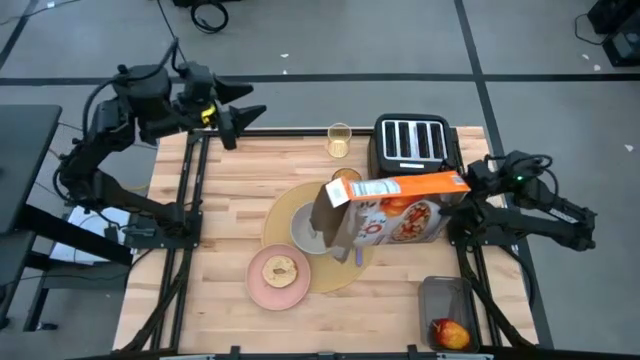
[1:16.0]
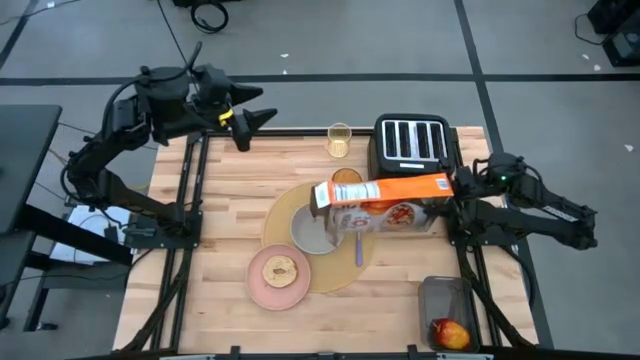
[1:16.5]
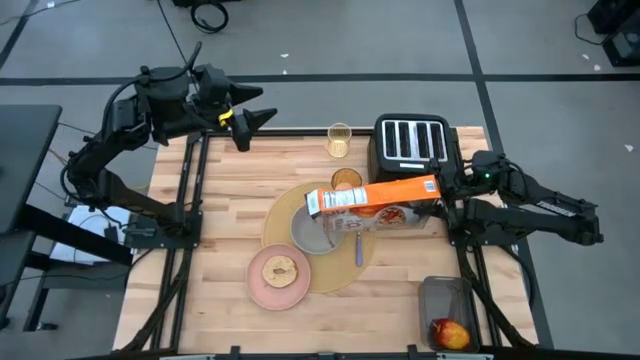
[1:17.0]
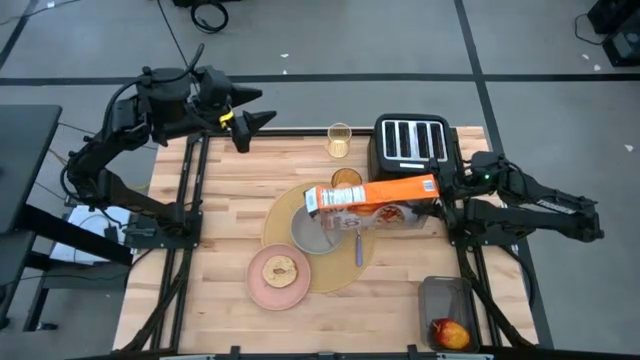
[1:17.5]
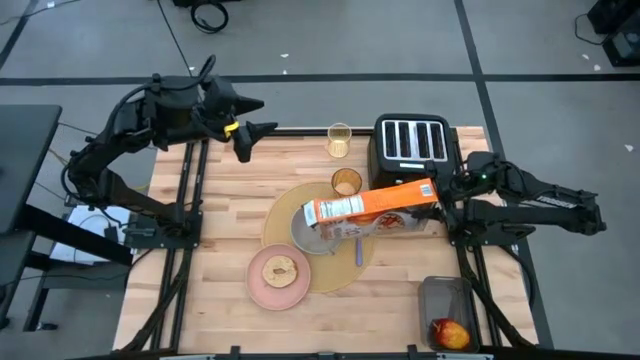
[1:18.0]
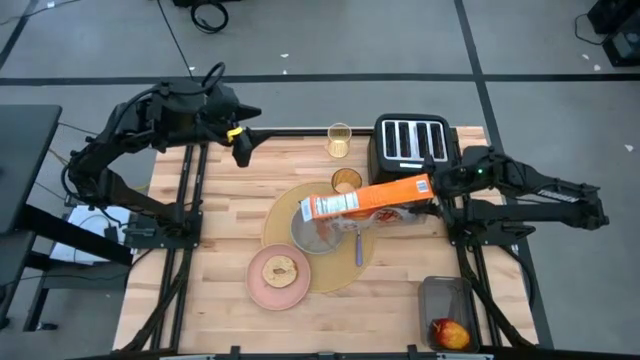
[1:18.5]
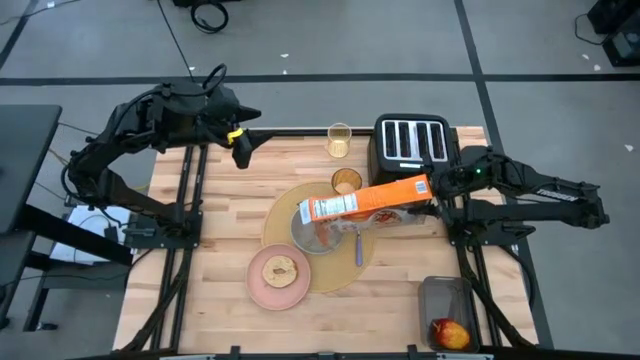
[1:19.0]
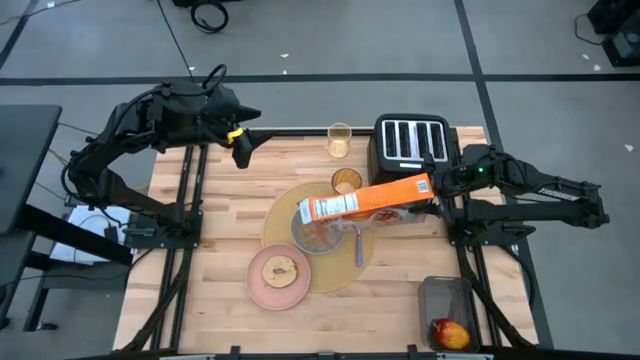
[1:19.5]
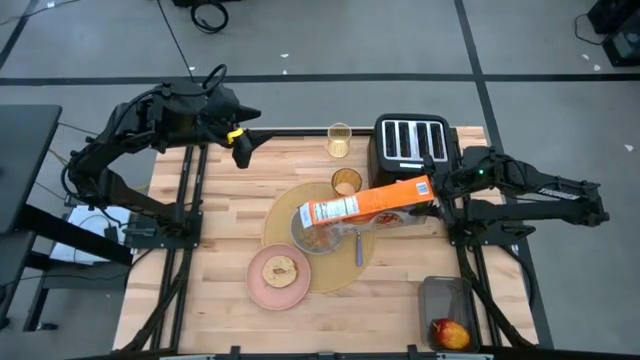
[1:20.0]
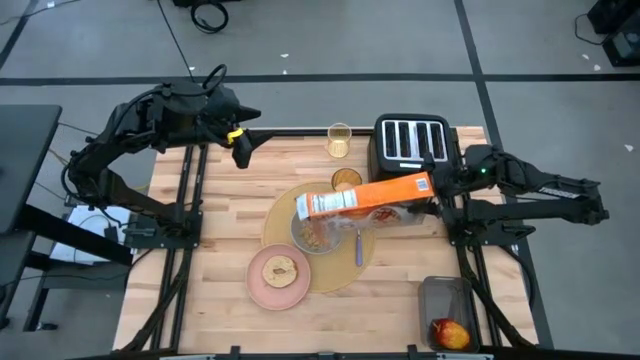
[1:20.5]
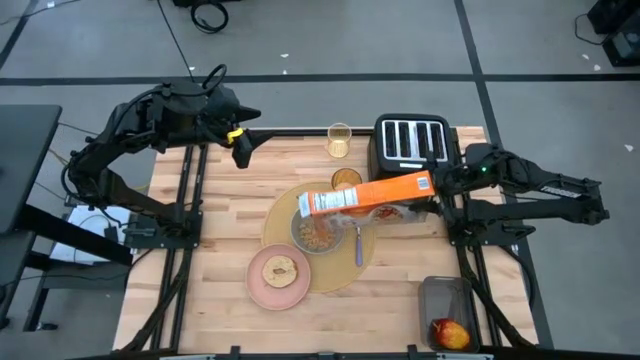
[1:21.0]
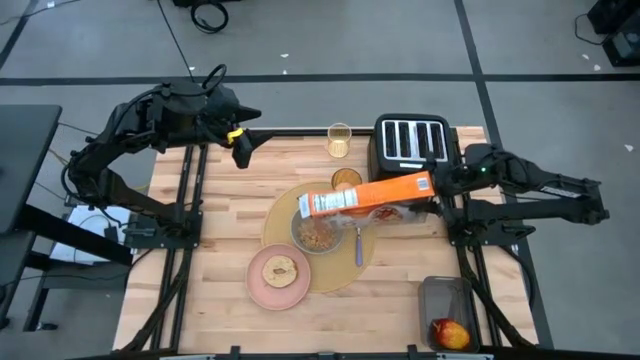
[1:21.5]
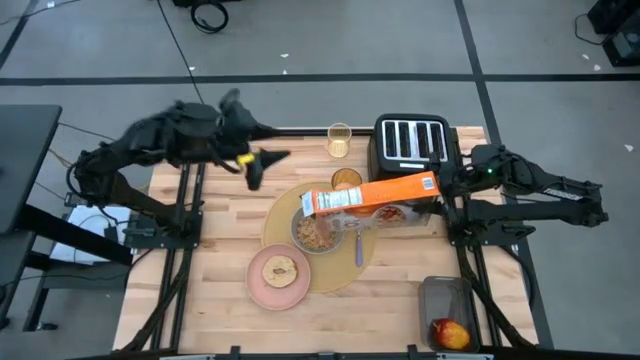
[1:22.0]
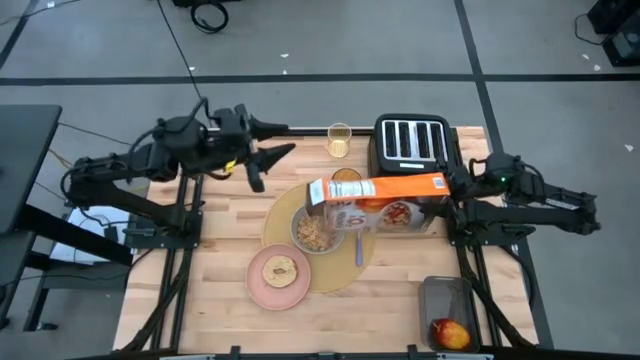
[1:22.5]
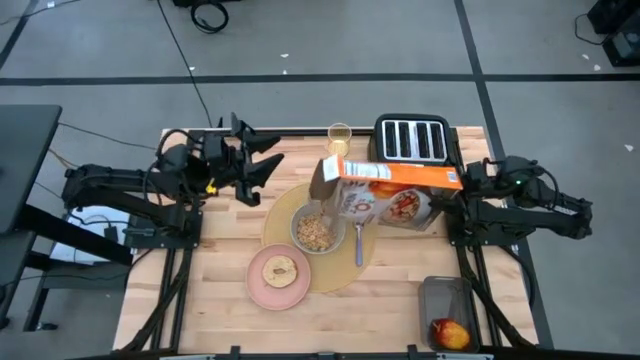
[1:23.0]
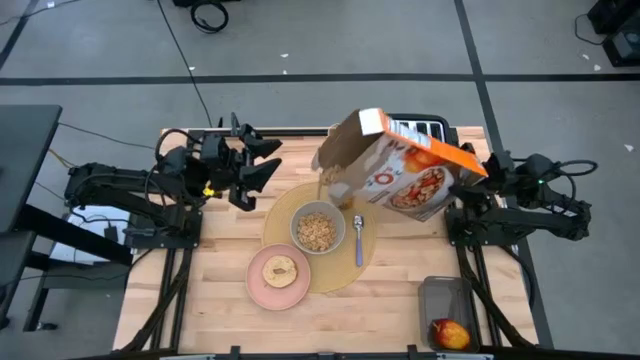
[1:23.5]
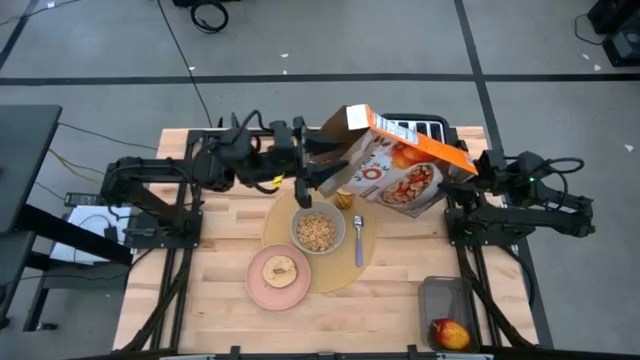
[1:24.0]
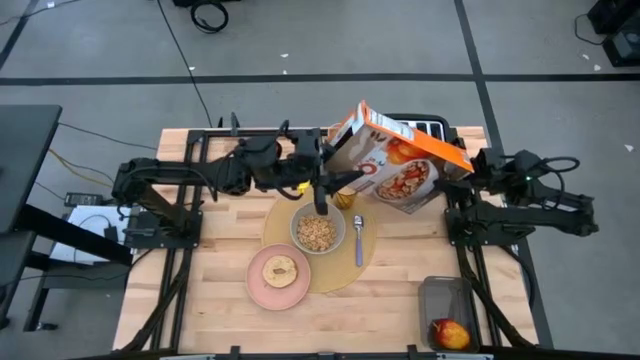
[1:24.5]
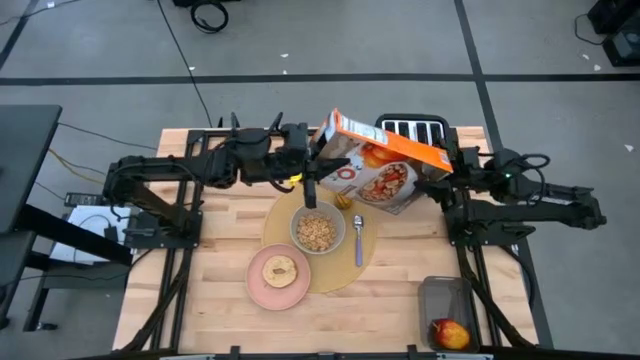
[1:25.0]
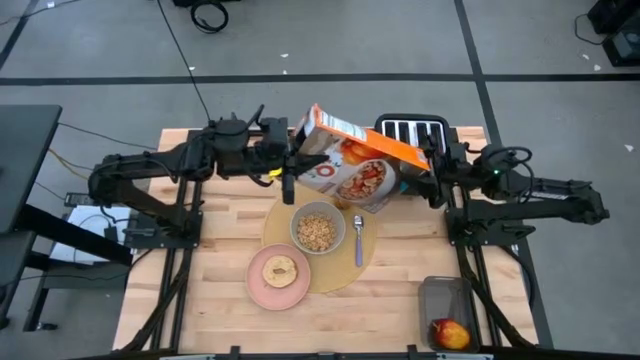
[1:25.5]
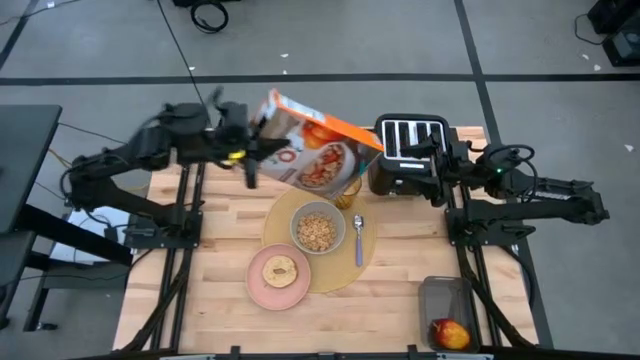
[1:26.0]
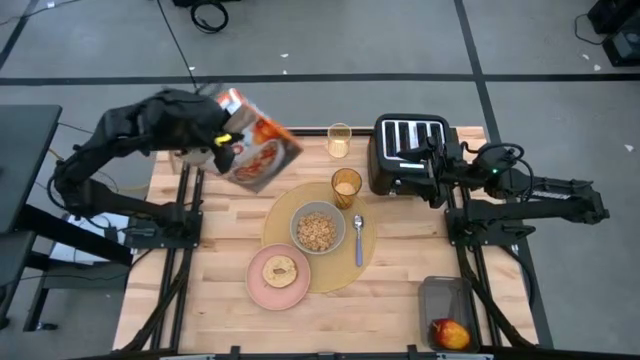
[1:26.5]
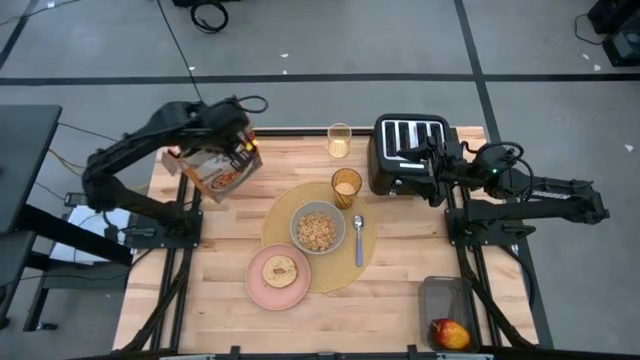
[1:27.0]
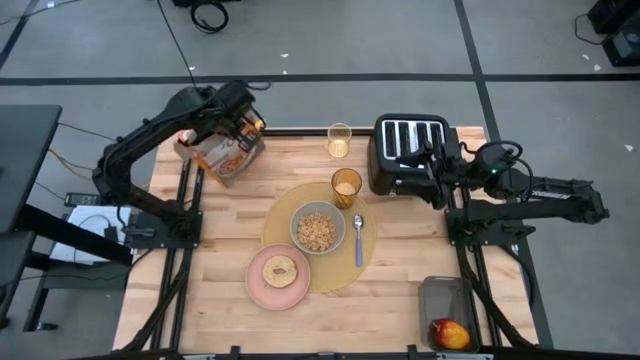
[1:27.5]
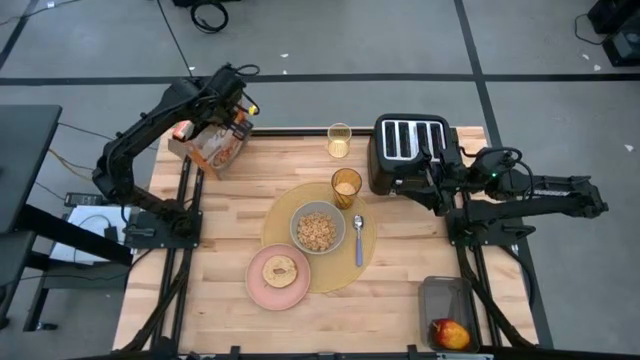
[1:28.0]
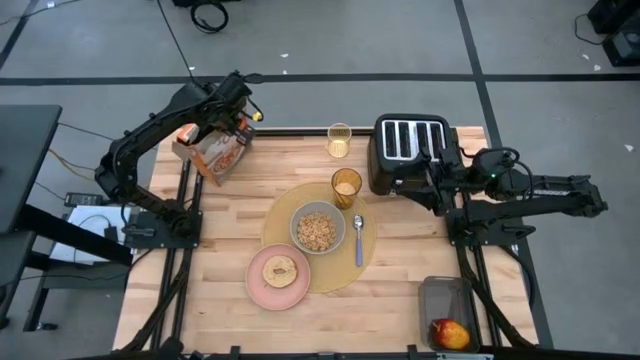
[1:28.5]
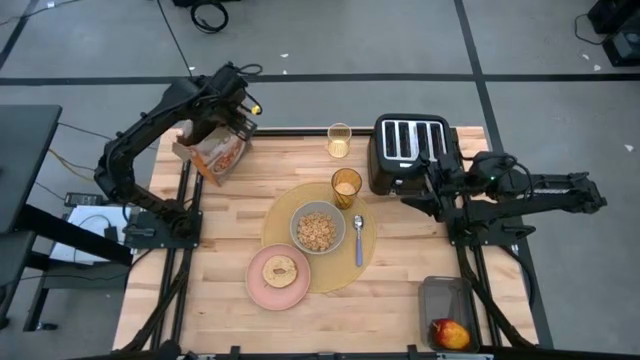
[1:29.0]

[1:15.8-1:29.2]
Task: Arrange a breakfast setting
Pour the cereal on the gray bowl

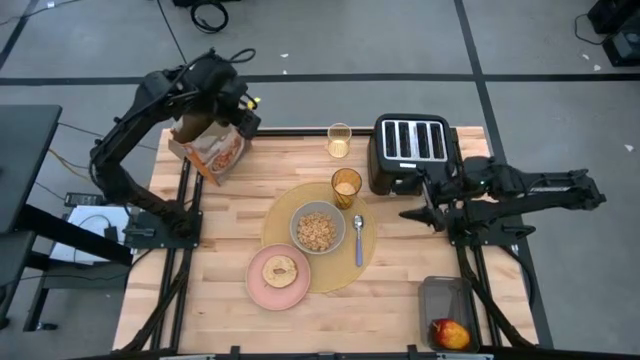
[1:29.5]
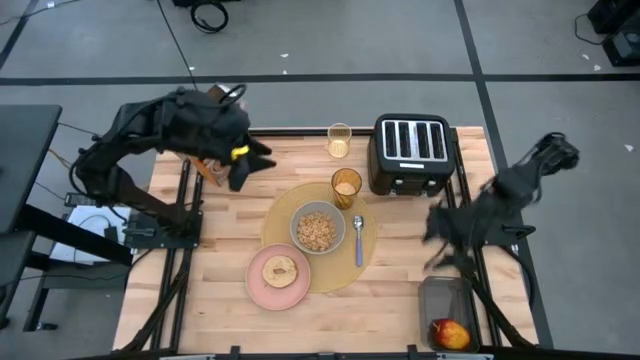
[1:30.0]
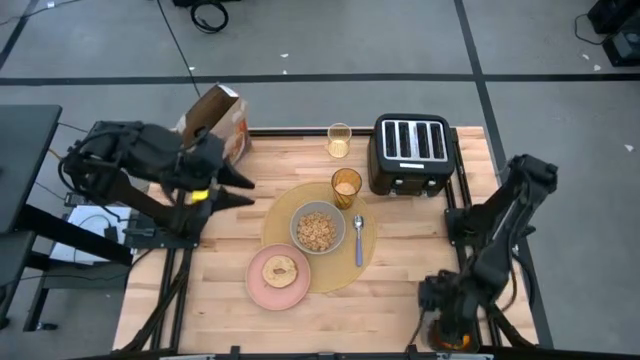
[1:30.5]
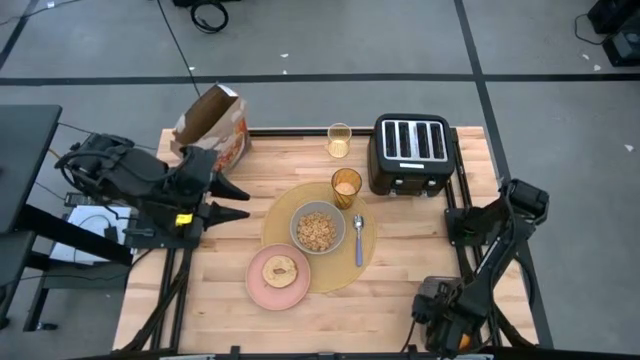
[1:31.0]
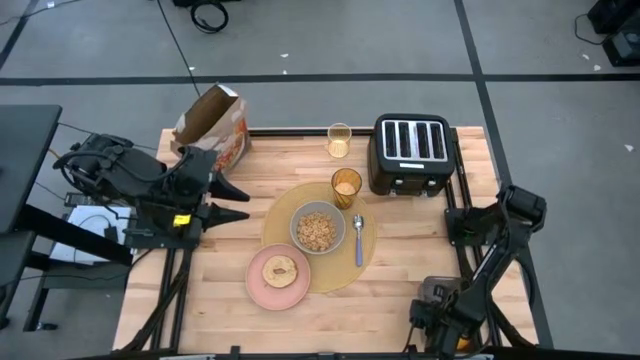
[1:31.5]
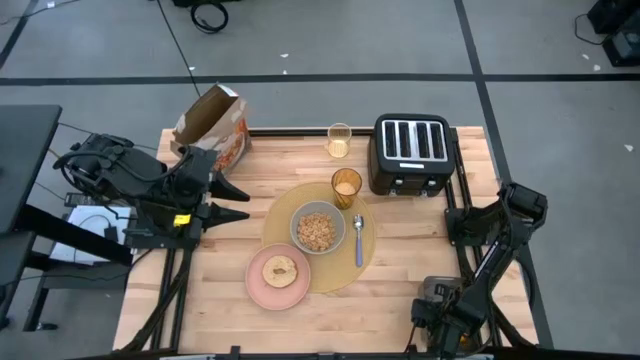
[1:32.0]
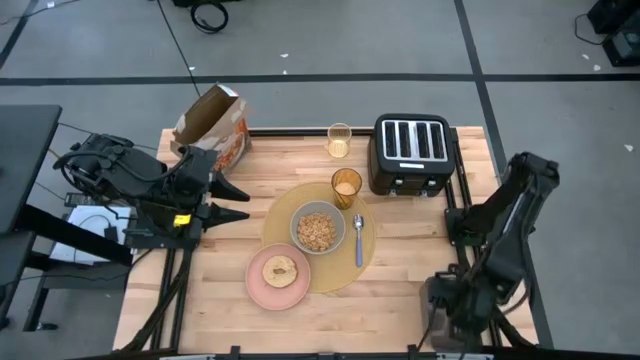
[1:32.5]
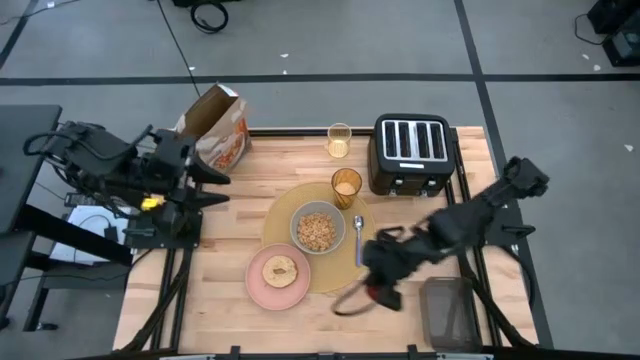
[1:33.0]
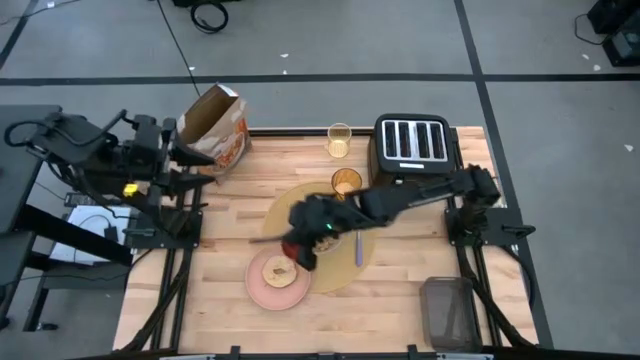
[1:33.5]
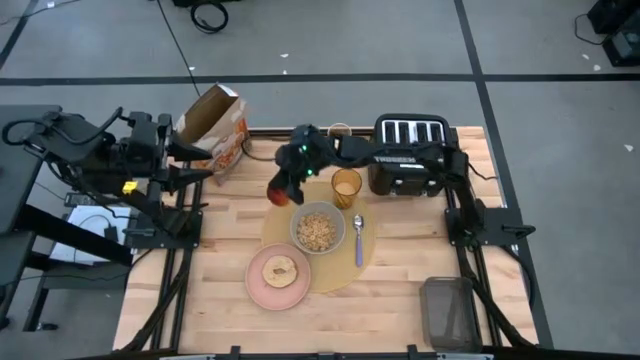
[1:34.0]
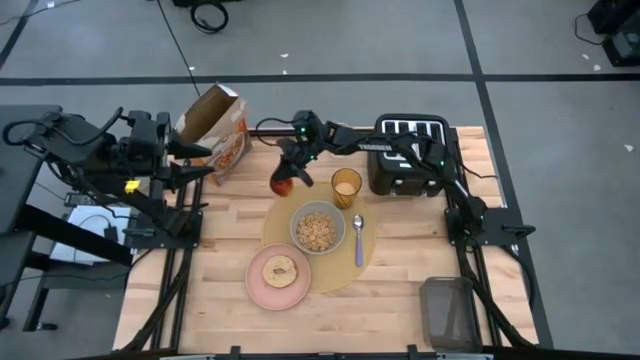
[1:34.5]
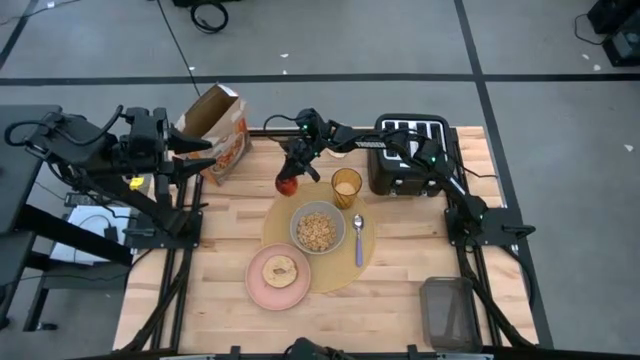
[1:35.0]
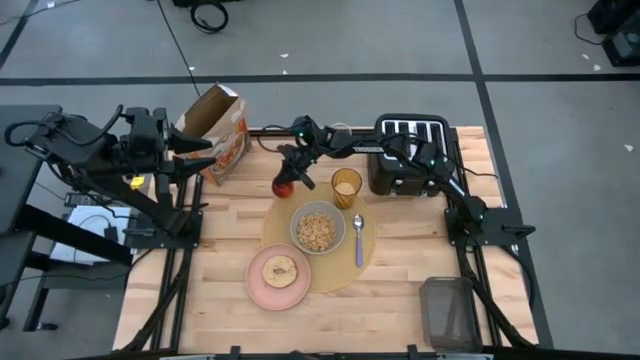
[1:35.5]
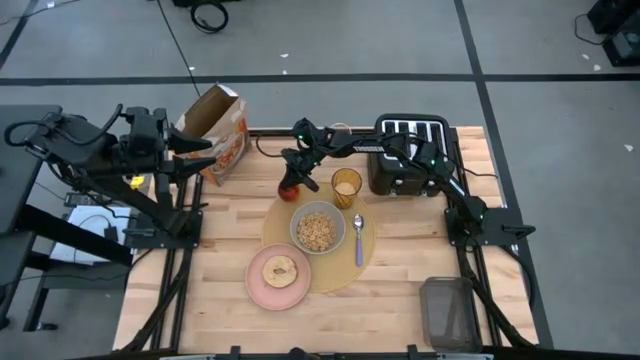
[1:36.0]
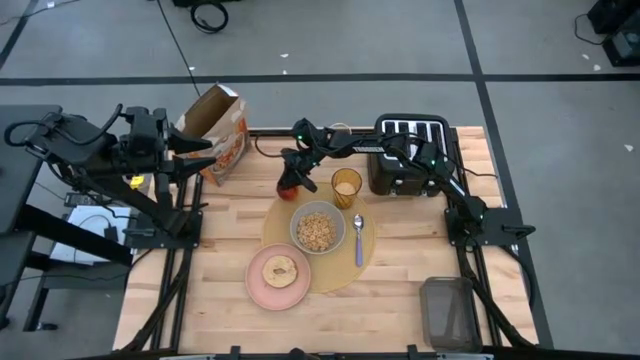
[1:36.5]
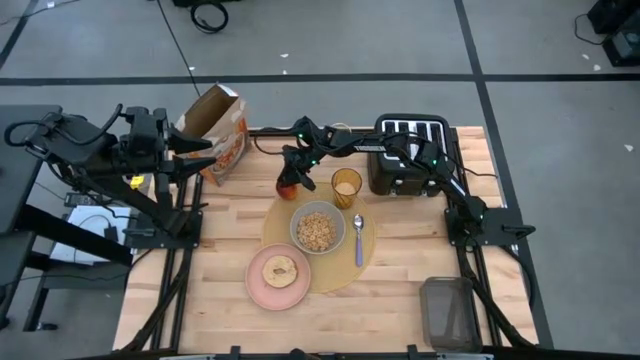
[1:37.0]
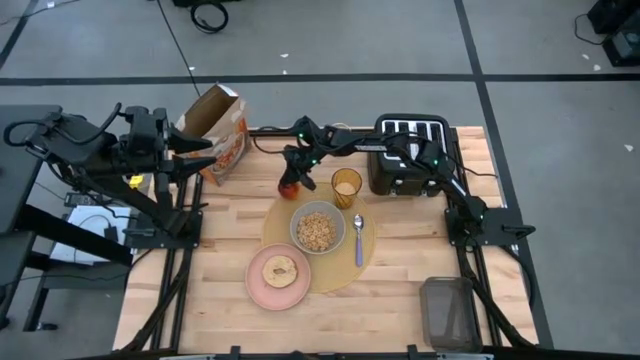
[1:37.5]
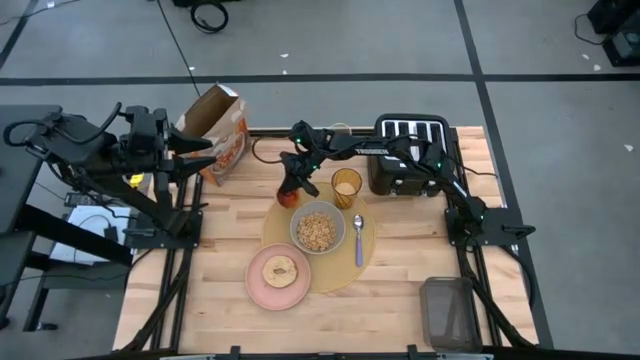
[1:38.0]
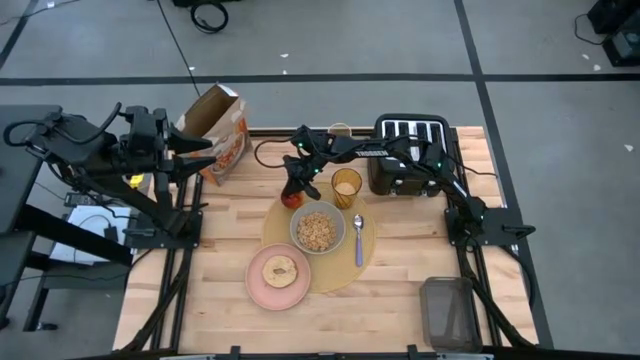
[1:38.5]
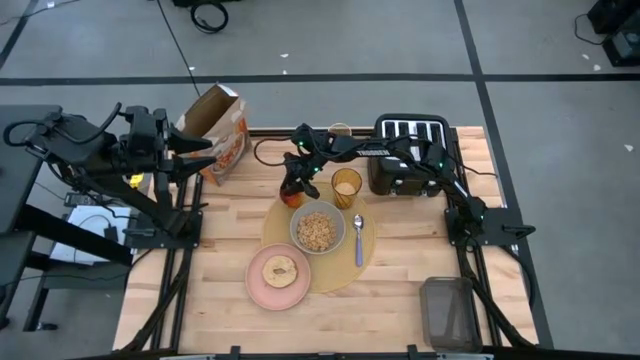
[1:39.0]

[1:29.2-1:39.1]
Put the apple on the top left of the gray bowl
